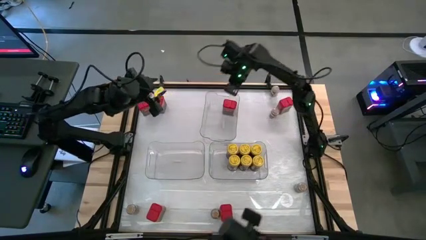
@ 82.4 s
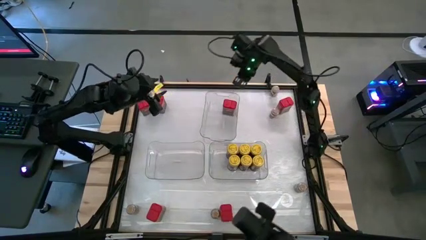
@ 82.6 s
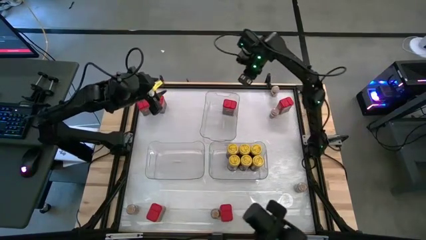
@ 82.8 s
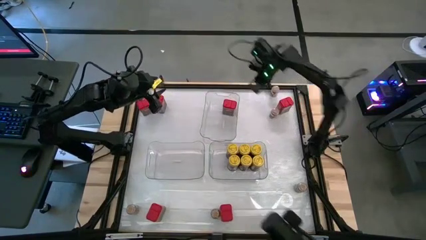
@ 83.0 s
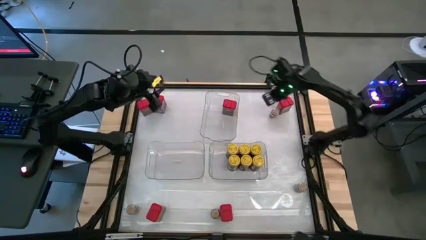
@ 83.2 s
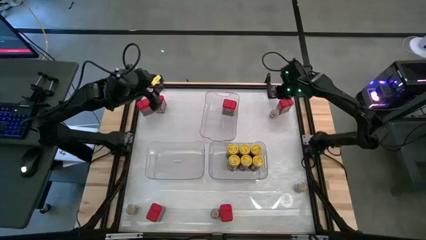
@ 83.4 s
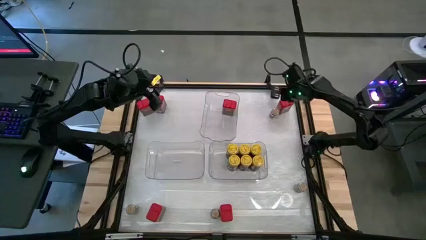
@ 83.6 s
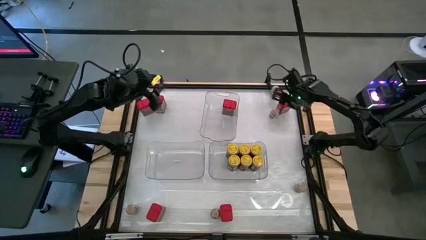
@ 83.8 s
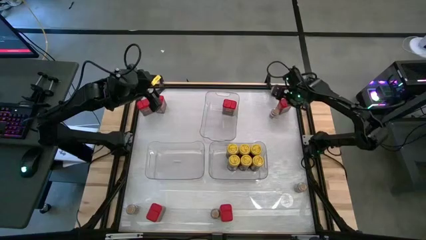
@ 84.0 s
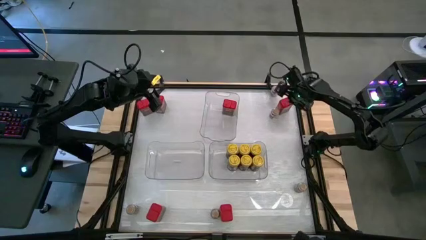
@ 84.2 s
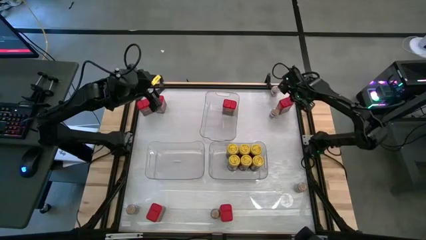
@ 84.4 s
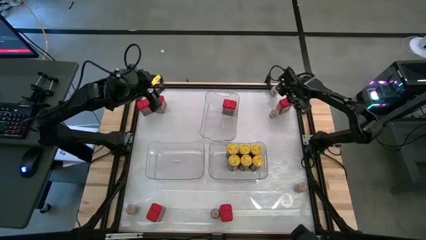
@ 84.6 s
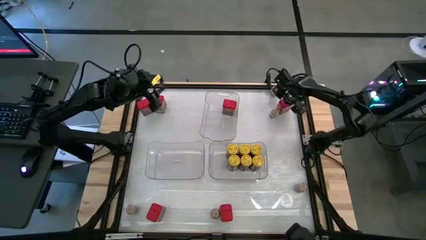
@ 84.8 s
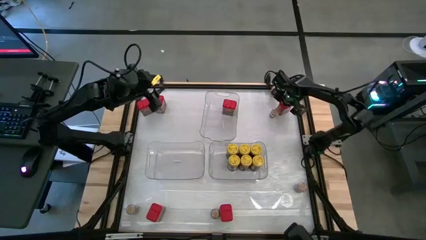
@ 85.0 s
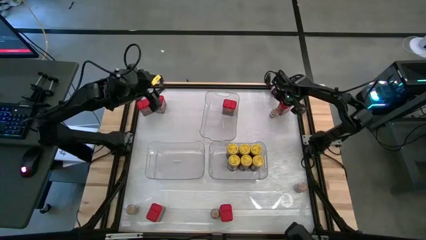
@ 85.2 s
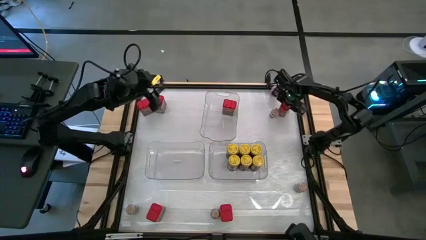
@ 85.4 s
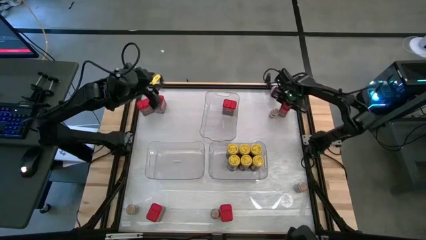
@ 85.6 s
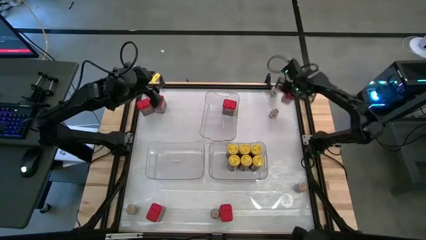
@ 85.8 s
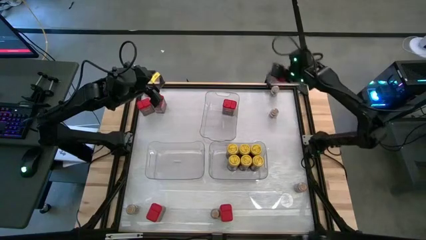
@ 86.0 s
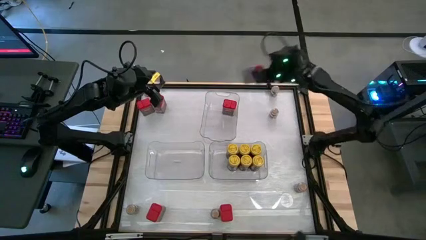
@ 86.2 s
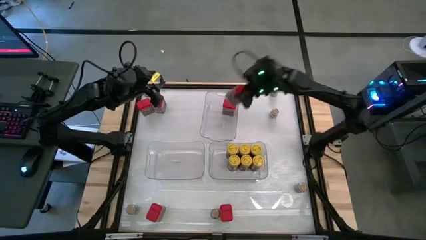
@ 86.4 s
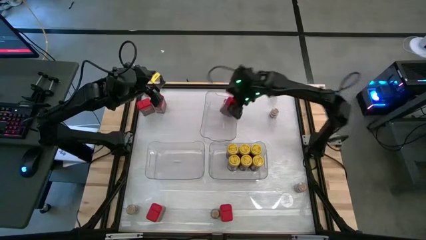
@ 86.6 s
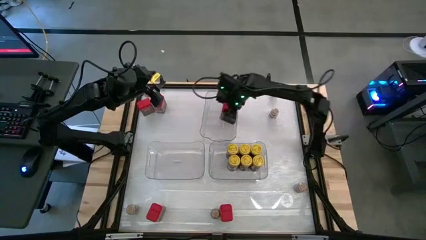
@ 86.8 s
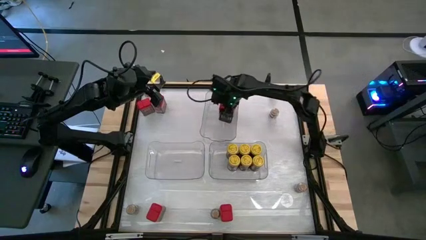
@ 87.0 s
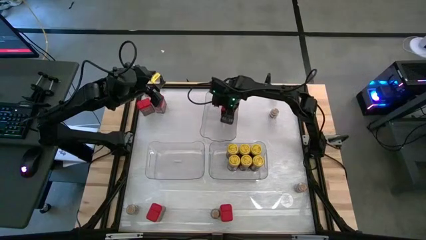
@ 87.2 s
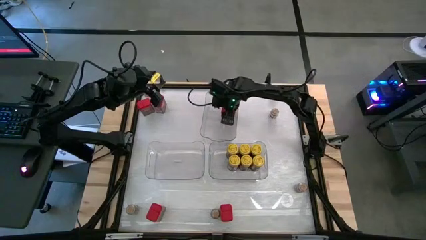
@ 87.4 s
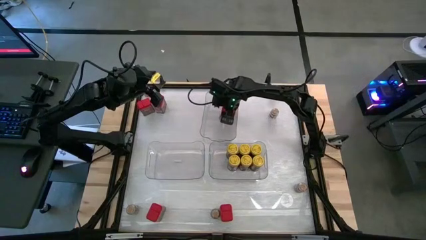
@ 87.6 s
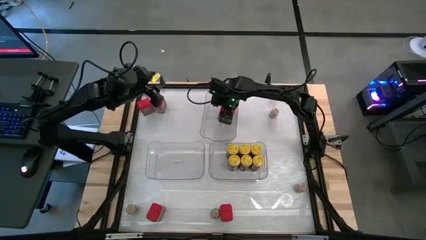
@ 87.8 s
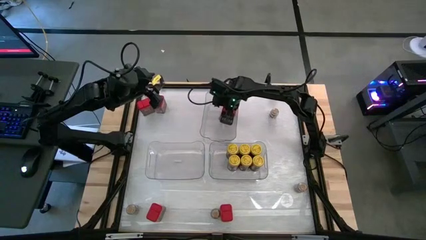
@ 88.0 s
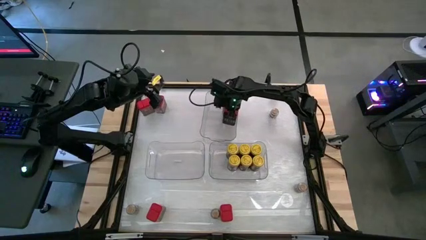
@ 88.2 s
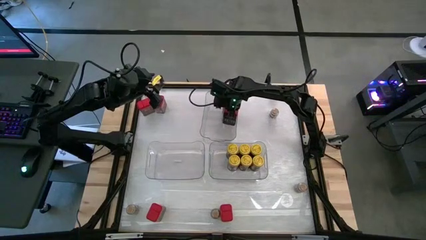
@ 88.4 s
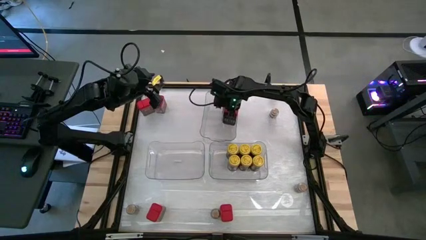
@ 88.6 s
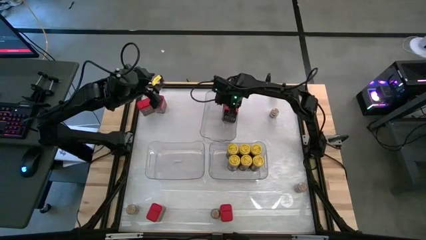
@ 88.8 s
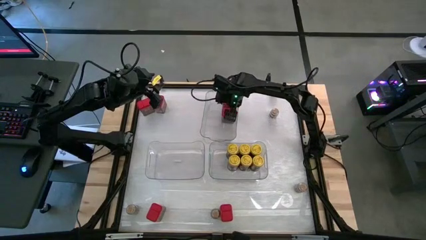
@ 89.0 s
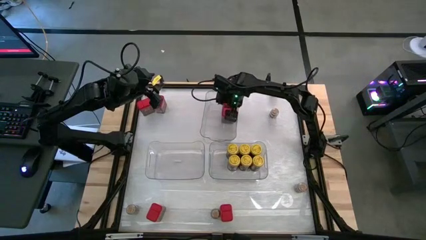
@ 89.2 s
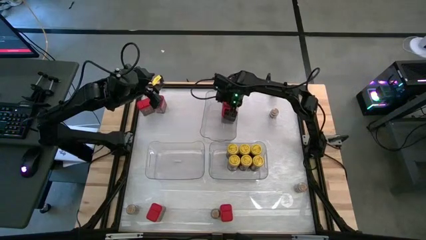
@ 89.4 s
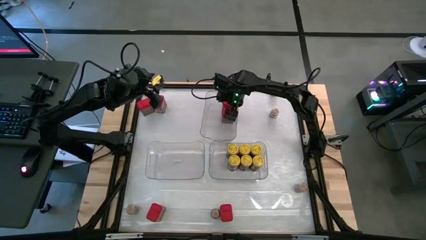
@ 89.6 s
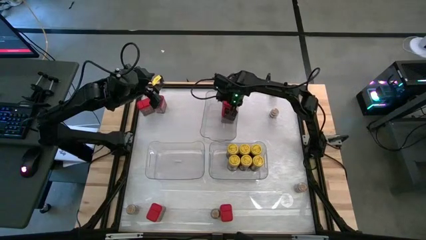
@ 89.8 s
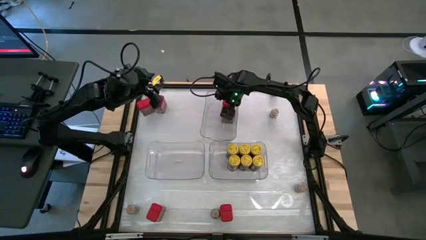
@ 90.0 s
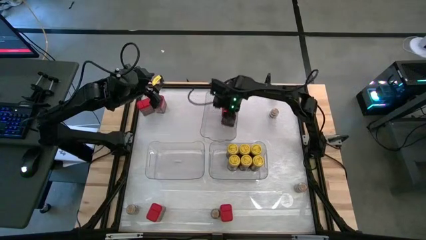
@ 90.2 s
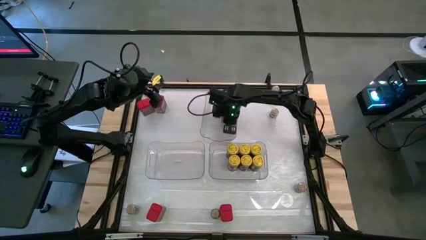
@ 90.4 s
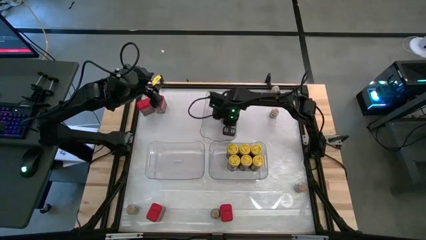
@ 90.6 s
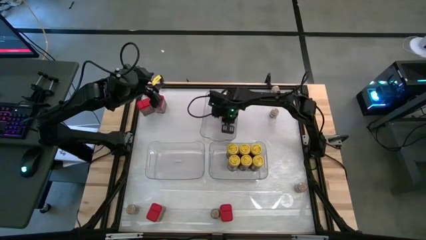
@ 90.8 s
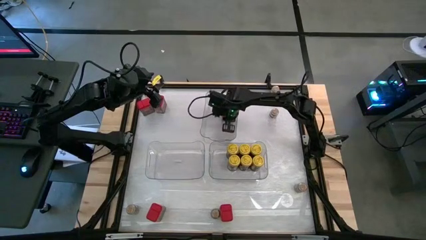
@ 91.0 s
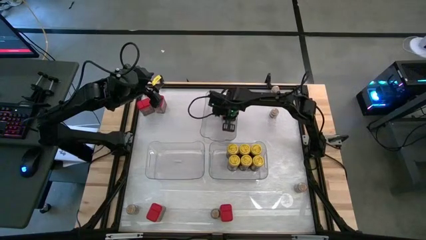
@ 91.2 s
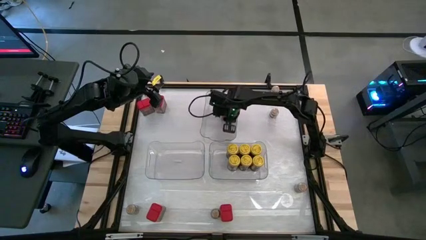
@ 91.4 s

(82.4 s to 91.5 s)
Task: Sort spices by type
Put the red seasoning can into the top transparent bin

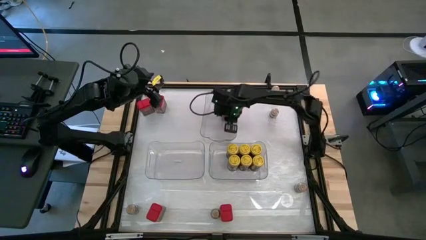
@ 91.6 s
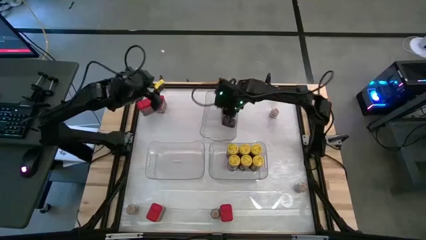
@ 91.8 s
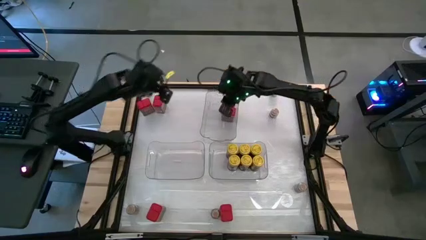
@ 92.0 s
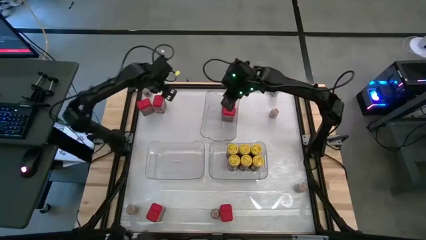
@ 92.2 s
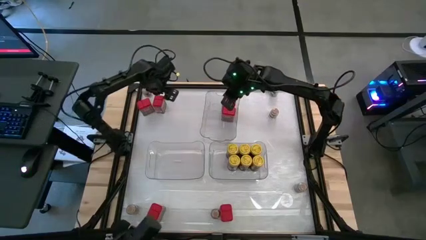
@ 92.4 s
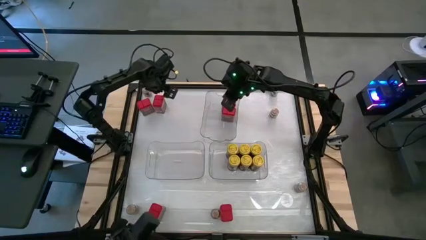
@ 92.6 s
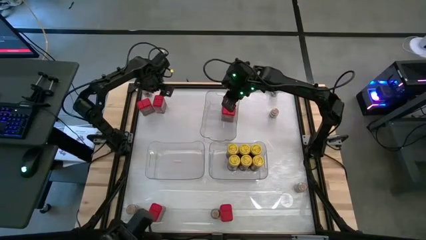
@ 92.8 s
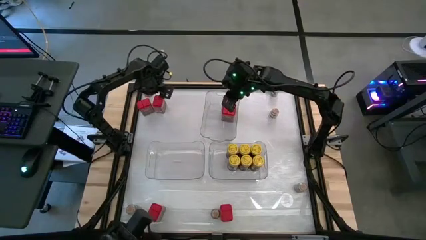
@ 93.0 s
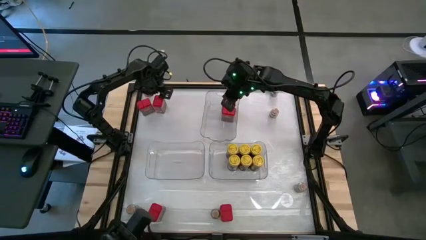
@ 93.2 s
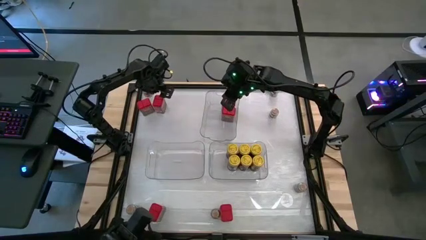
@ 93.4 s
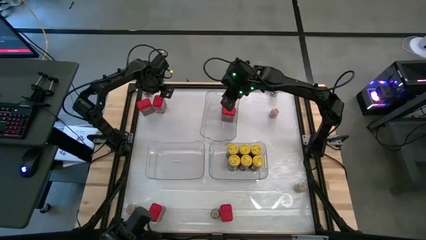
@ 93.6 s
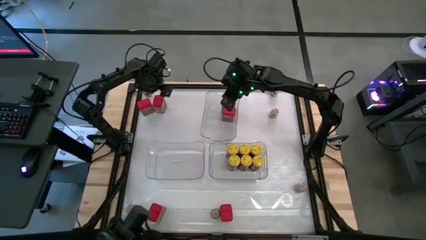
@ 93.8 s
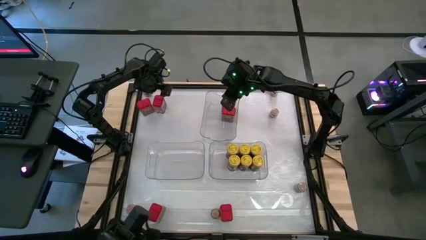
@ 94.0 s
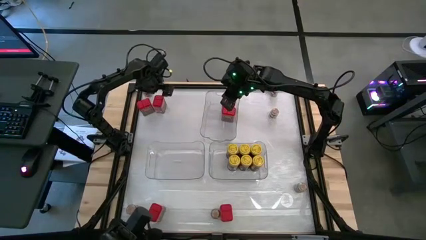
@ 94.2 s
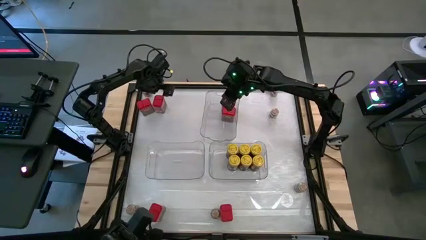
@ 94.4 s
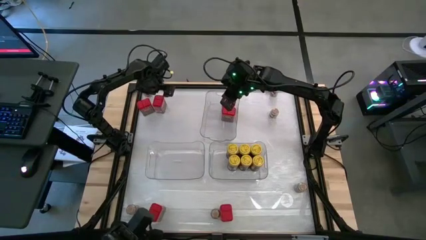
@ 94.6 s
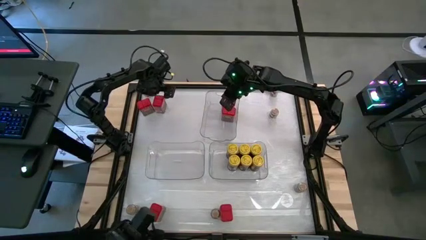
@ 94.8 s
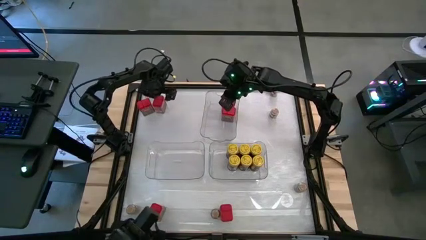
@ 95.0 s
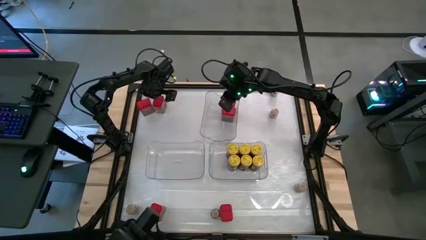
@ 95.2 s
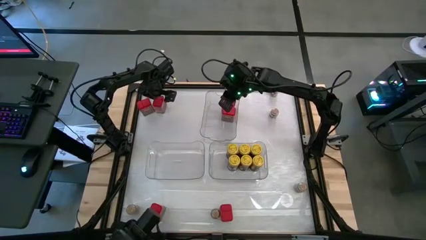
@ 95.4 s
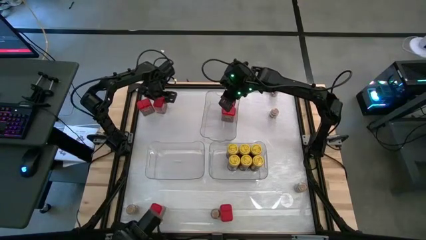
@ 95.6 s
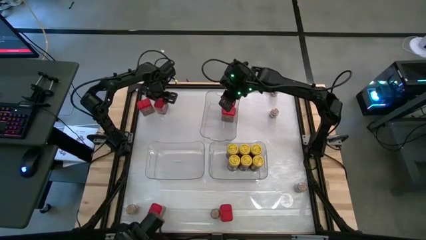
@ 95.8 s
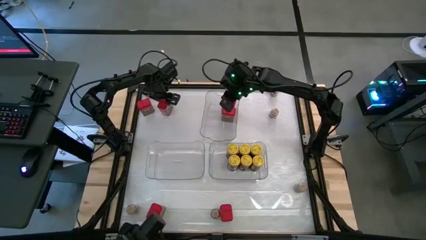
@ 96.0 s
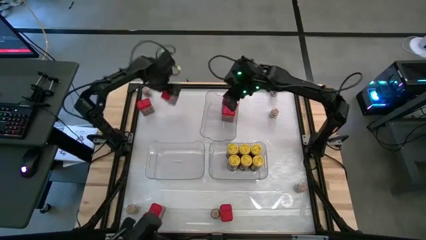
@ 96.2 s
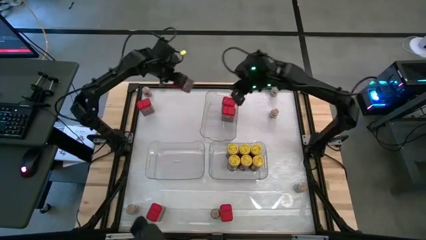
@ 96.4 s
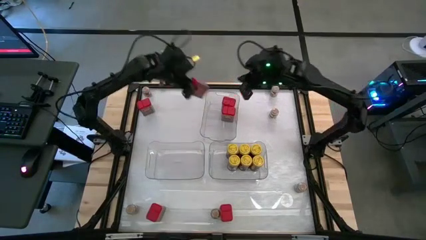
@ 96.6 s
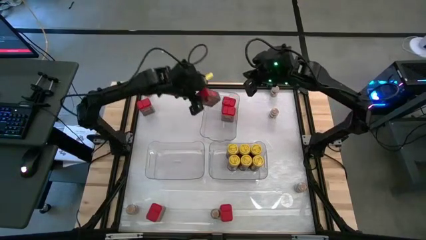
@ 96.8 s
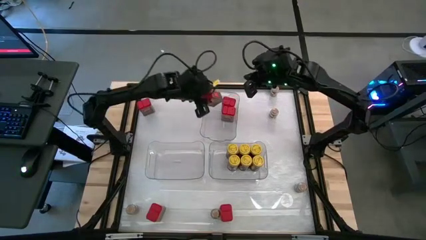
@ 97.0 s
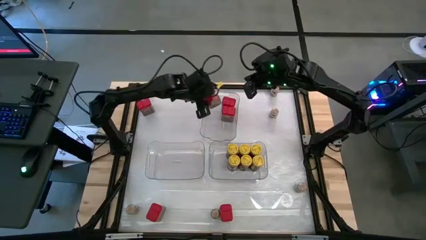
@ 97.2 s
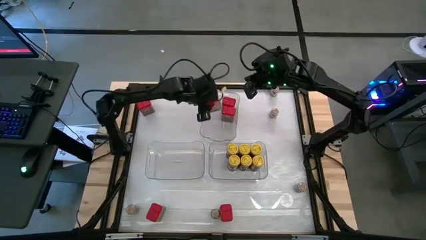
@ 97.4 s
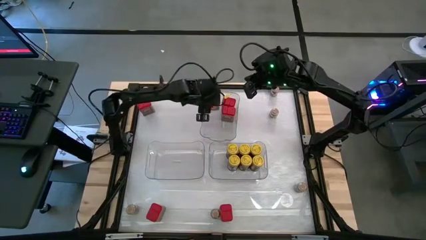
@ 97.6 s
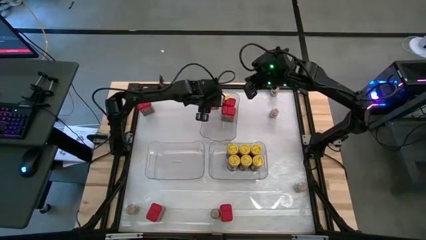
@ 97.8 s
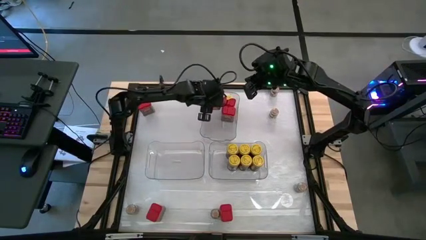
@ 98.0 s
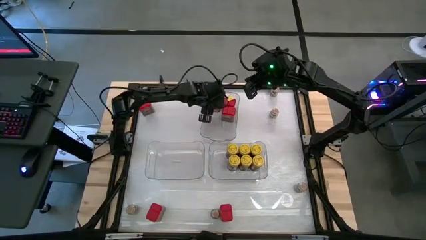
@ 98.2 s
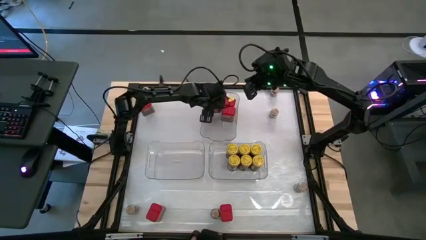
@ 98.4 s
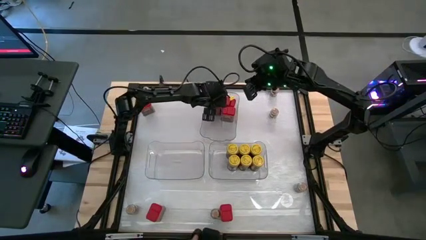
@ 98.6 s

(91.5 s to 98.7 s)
Put the red seasoning can into the top transparent bin
